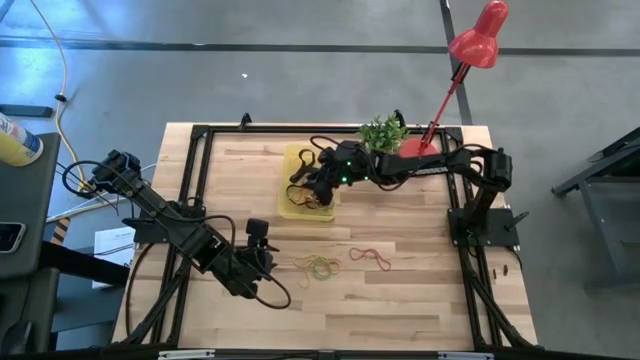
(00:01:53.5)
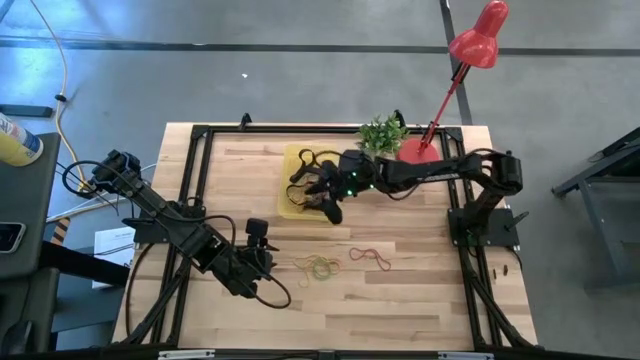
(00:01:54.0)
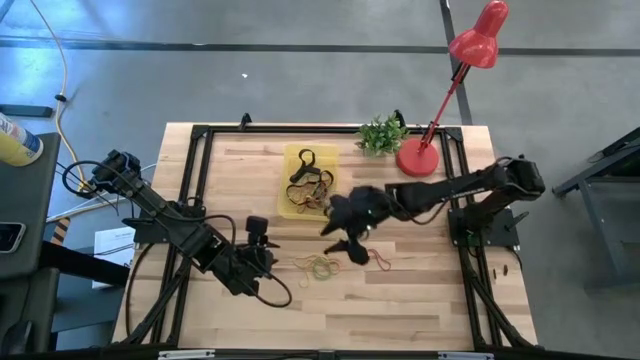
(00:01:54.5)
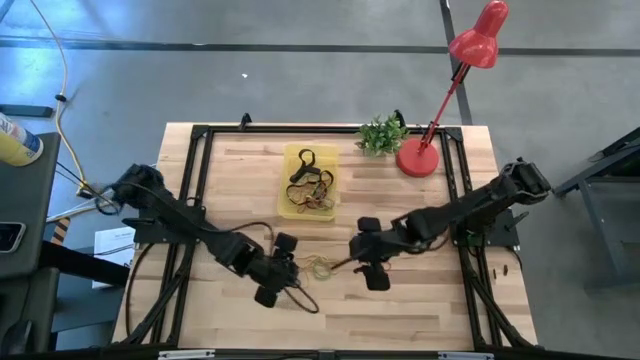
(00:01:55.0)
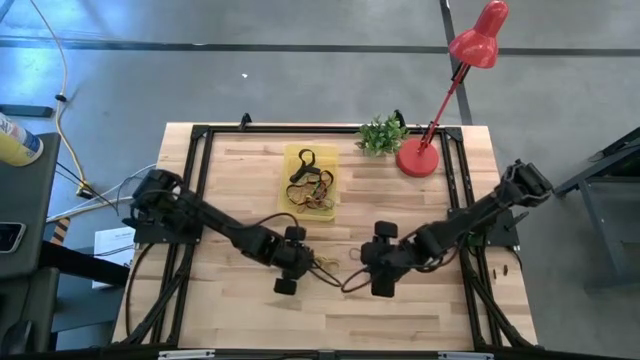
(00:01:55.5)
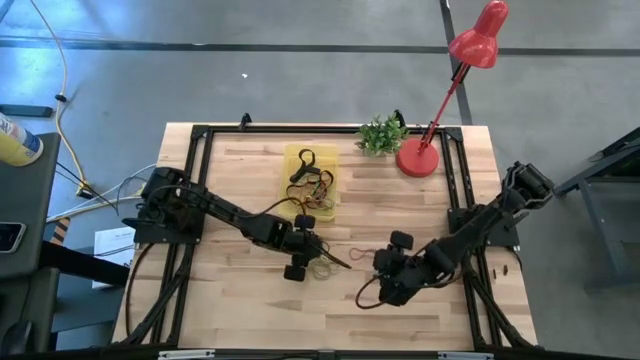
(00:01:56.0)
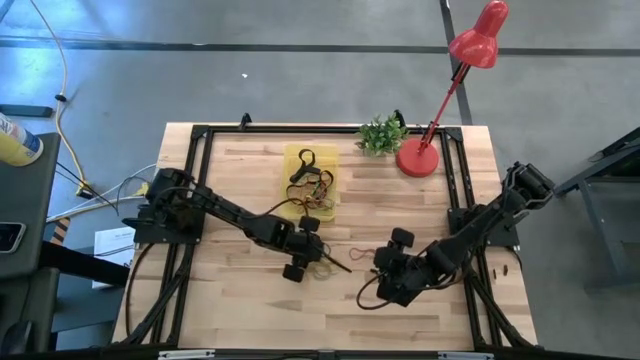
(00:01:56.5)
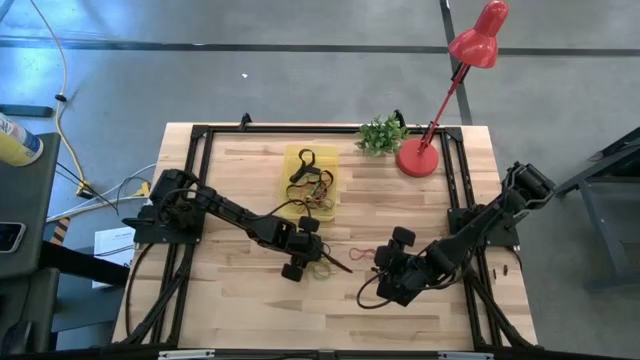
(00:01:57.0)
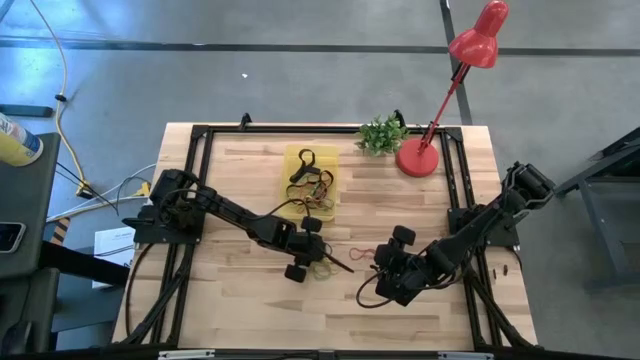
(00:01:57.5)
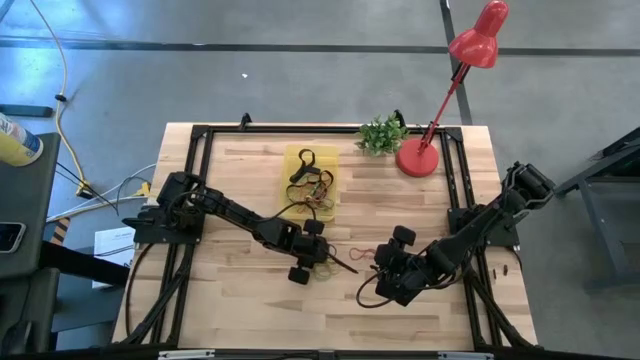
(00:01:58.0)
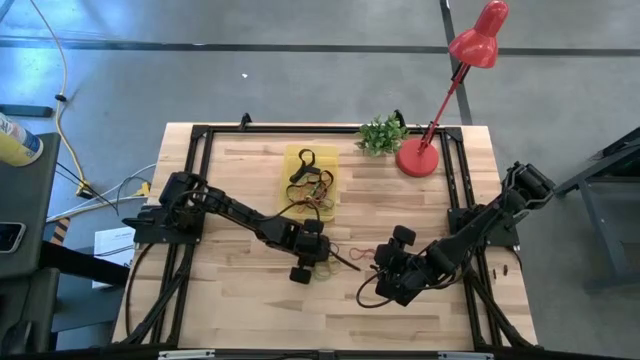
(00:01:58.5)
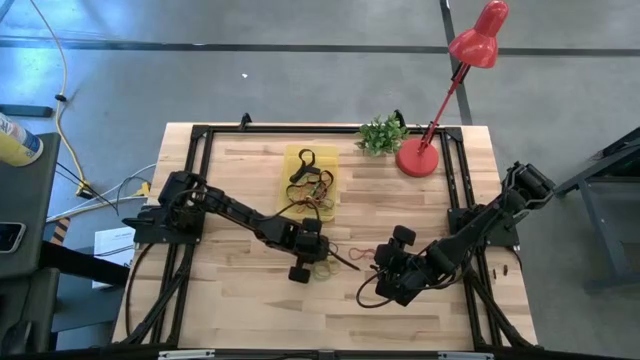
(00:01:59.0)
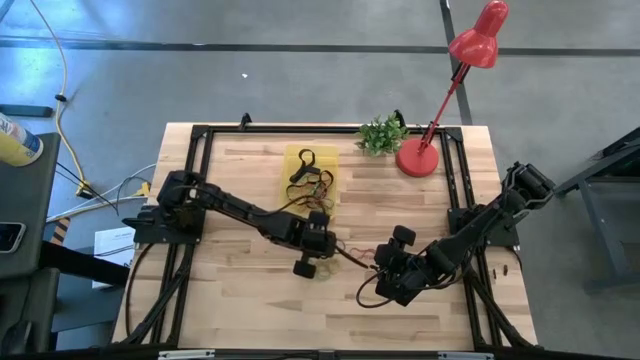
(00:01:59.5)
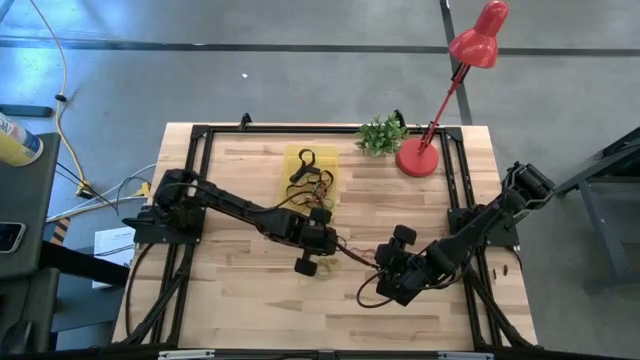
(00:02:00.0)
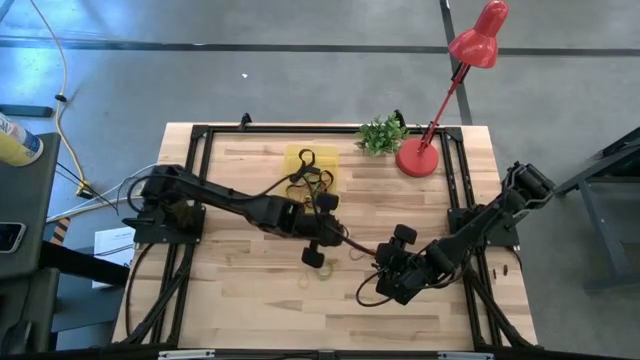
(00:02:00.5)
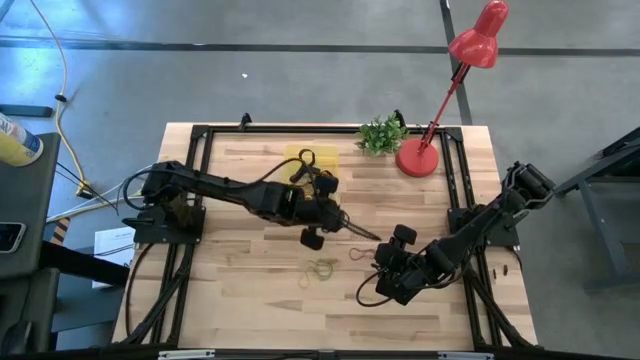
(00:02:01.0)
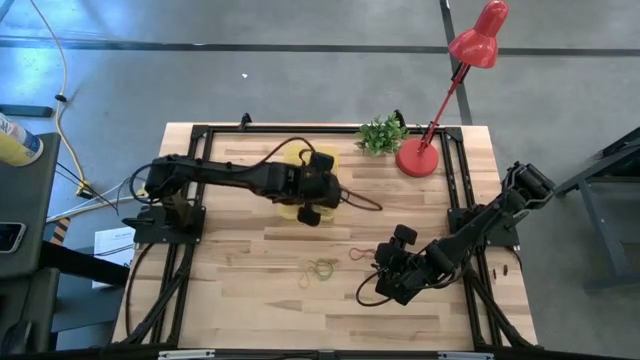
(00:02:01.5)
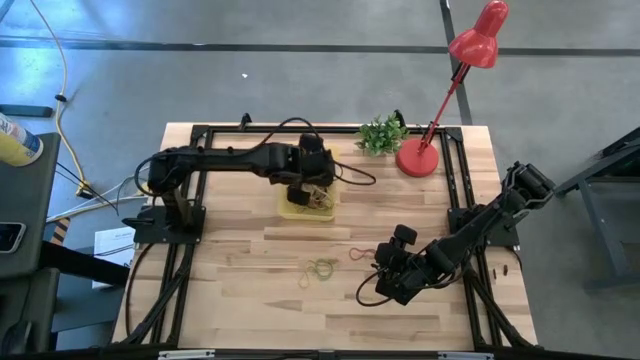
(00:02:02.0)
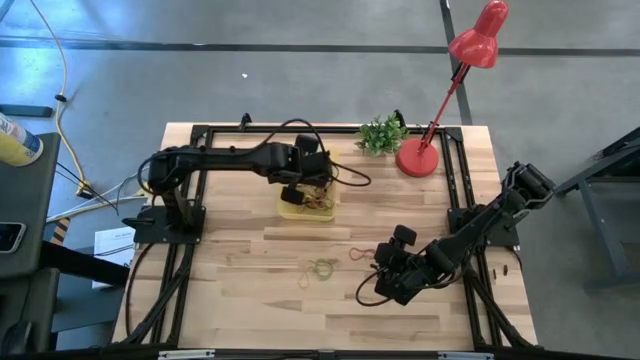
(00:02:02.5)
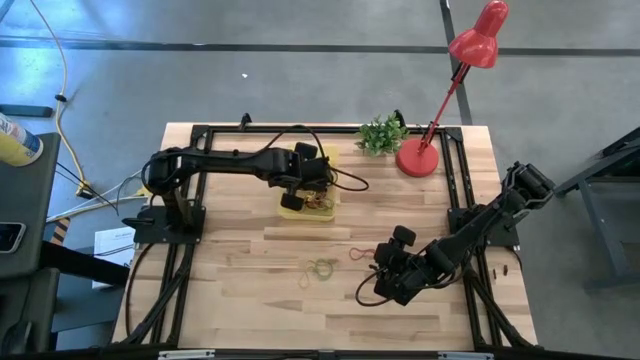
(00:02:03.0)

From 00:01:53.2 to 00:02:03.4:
Task: Pick and place rubber bands into bin
Put the yellow rubber band into the yellow bin

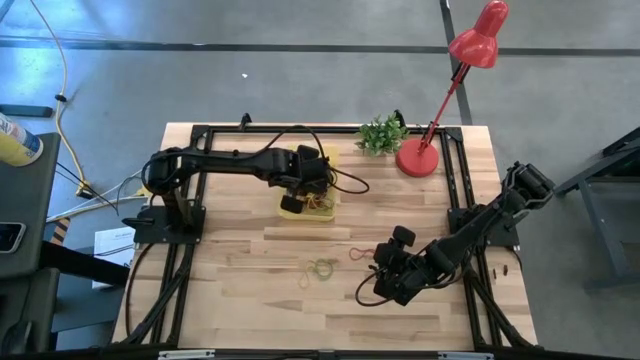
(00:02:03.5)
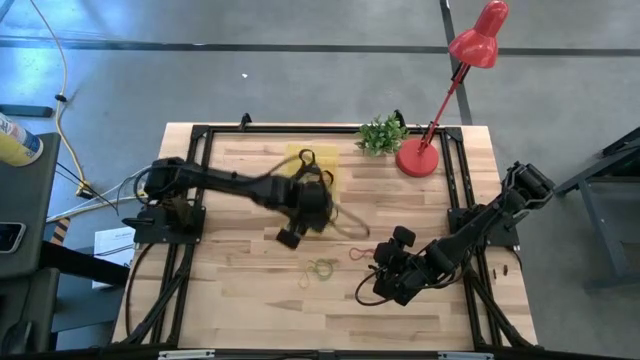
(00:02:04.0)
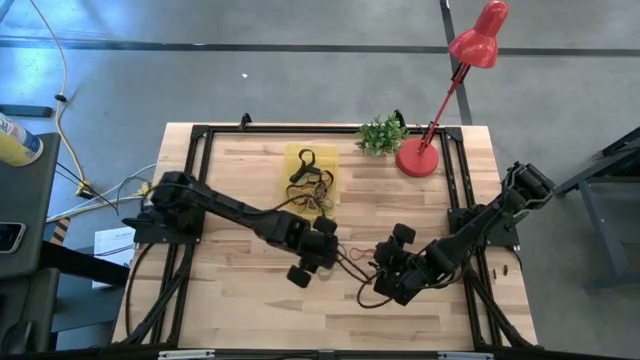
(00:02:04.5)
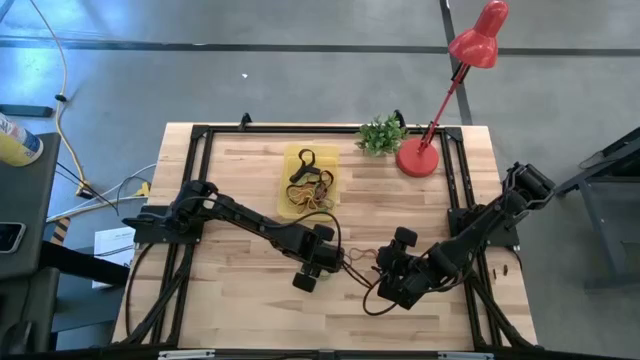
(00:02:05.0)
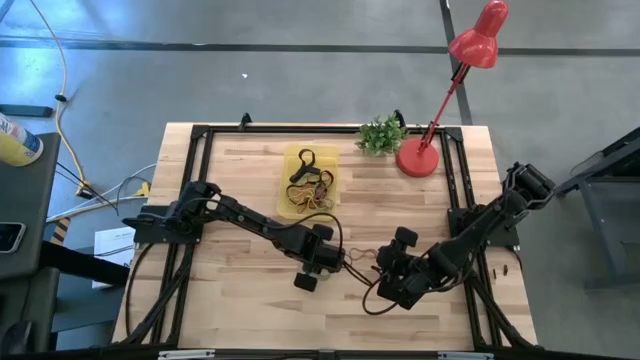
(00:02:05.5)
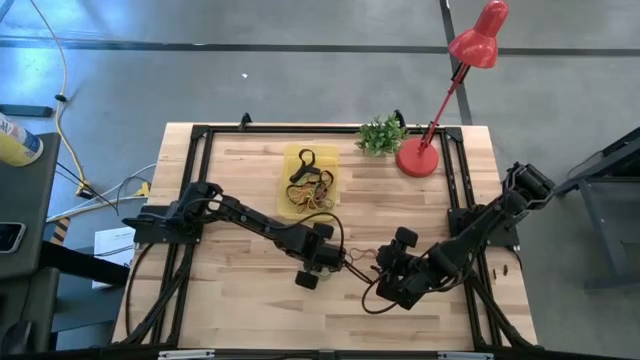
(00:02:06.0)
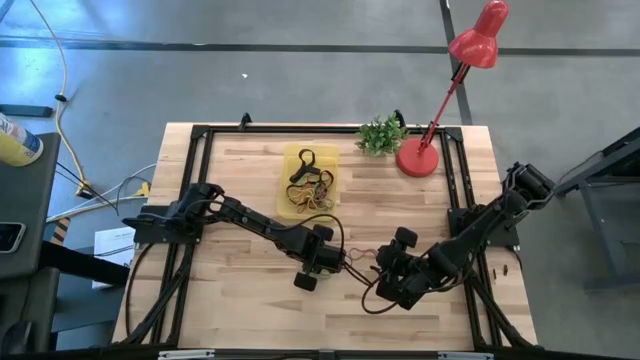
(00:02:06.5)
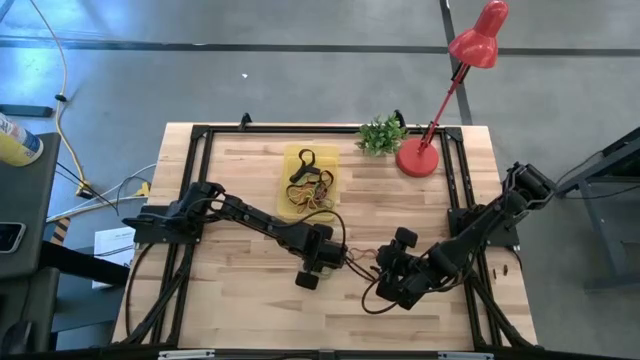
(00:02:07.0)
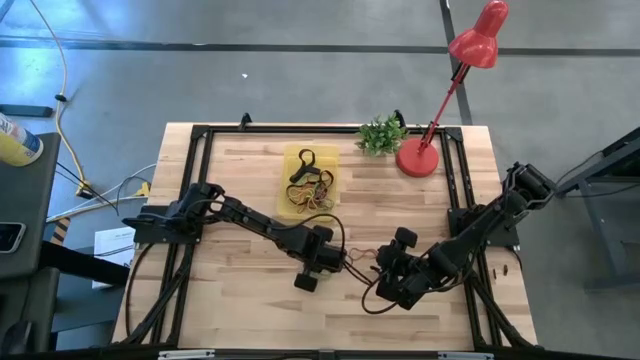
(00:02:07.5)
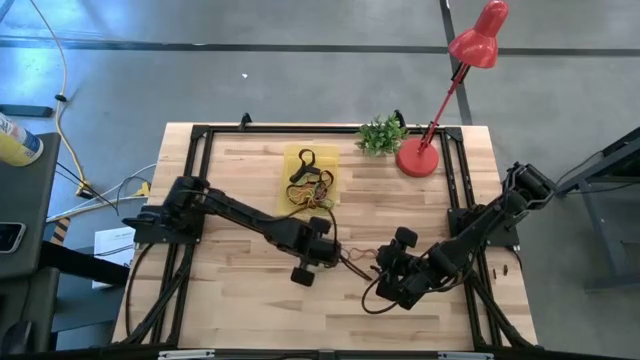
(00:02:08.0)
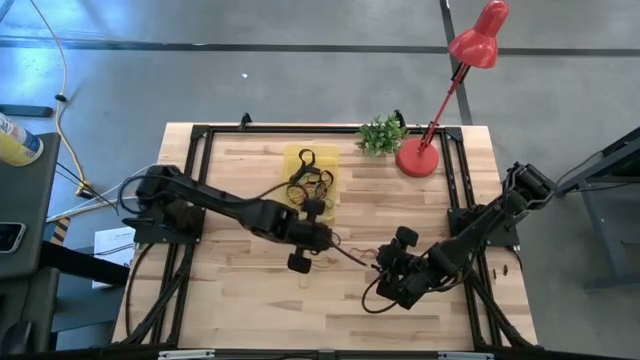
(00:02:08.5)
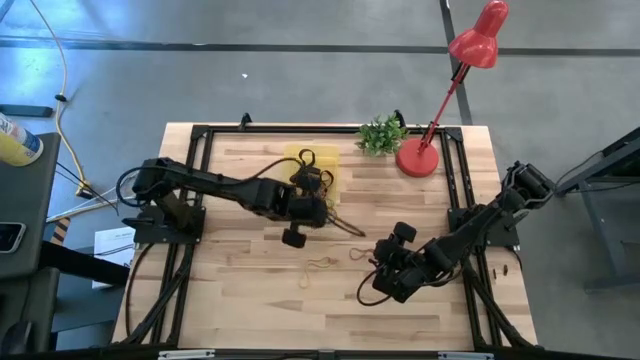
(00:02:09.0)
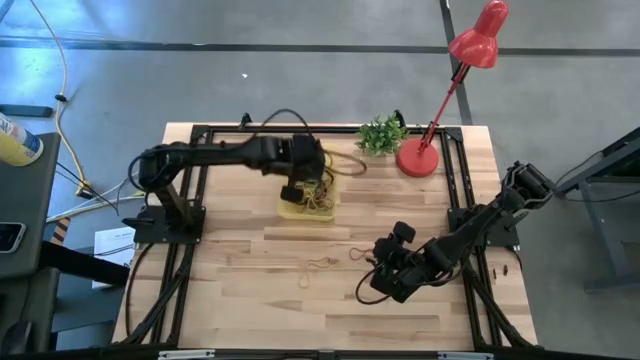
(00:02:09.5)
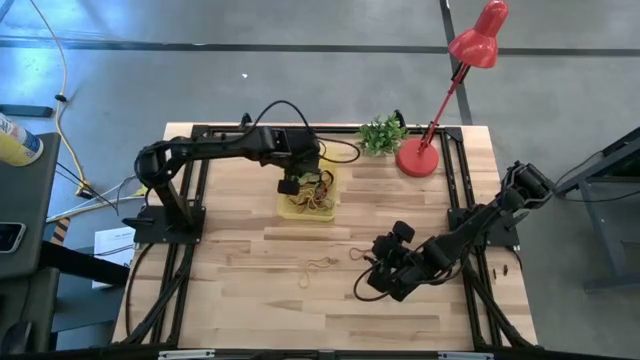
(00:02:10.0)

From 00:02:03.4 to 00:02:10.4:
Put the green rubber band into the yellow bin

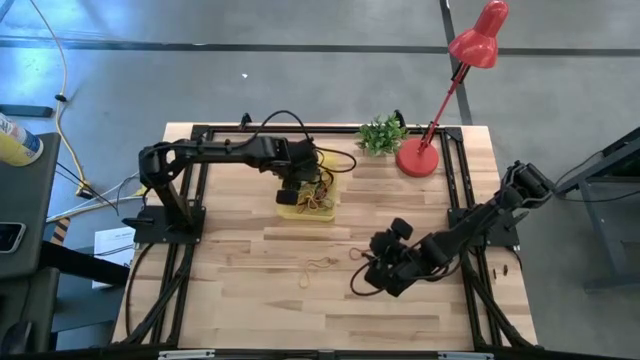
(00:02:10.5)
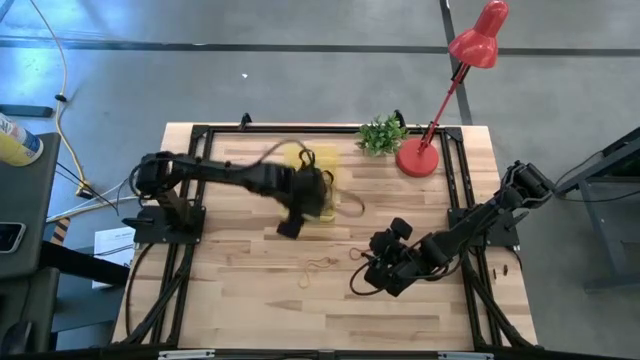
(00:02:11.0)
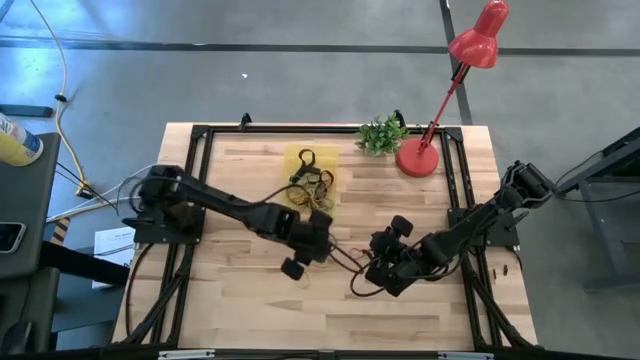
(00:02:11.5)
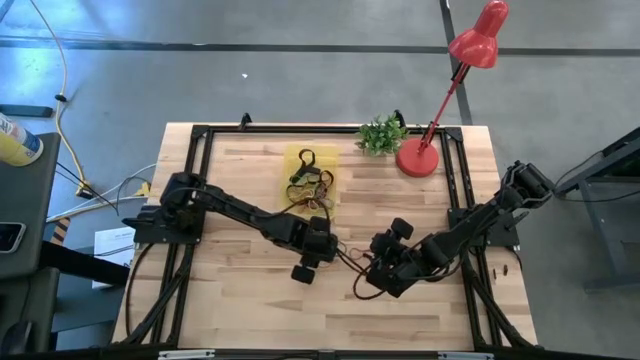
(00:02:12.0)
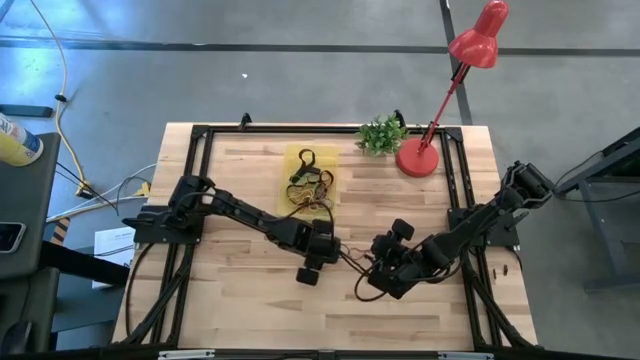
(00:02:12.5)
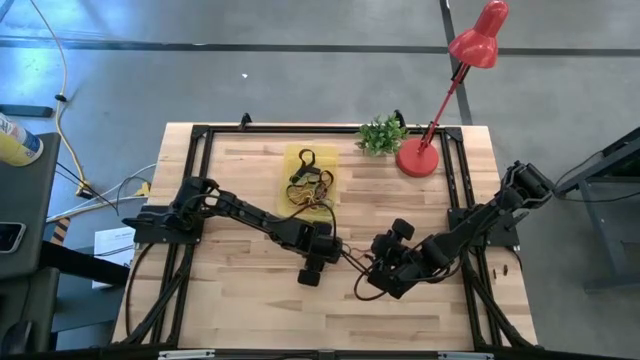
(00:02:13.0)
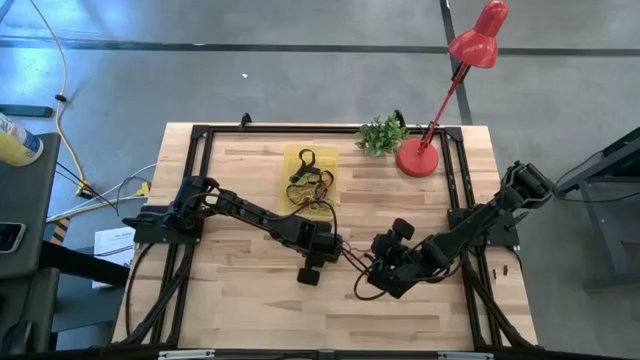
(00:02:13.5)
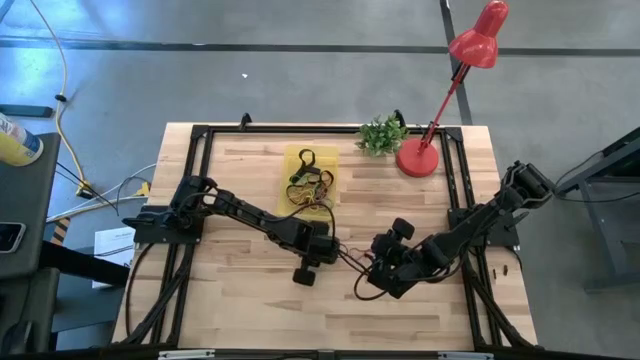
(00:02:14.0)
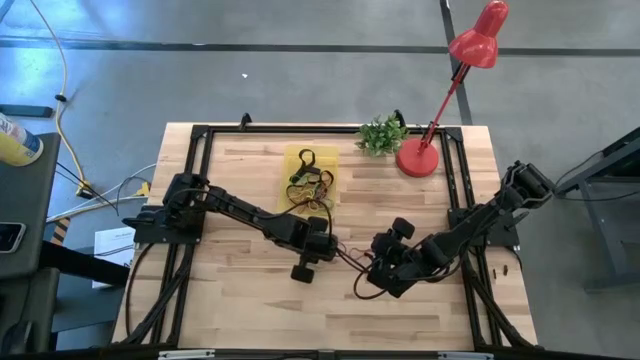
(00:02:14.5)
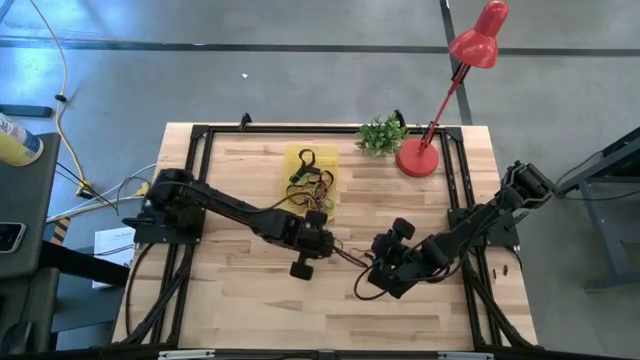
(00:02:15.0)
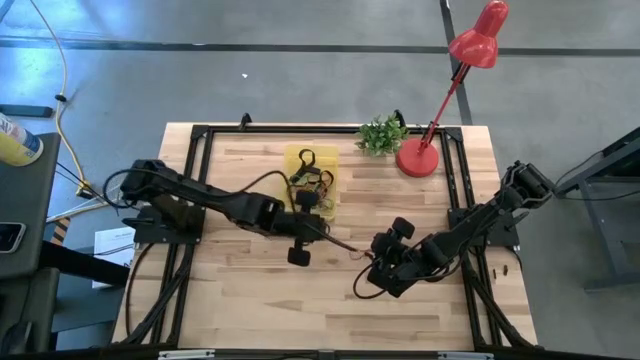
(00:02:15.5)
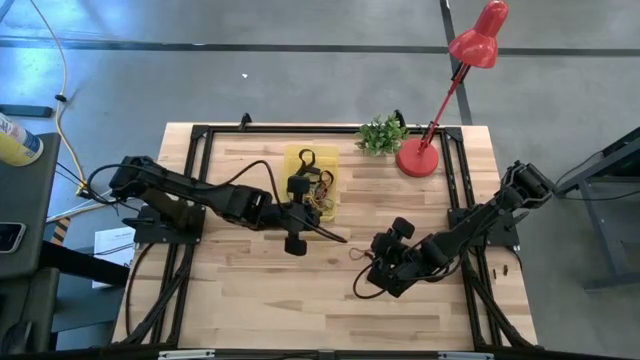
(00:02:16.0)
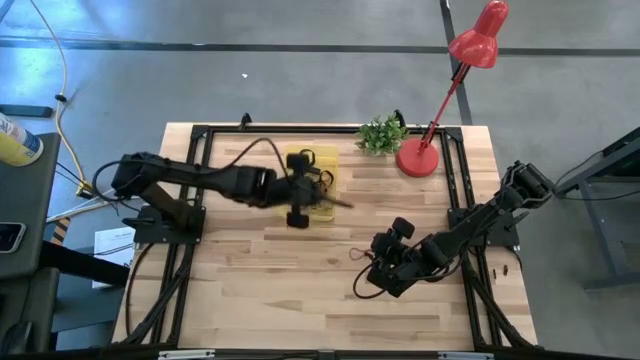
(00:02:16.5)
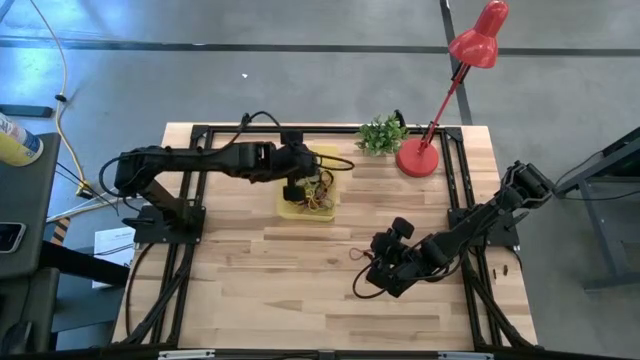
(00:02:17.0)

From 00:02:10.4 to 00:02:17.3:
Put the yellow rubber band into the yellow bin
